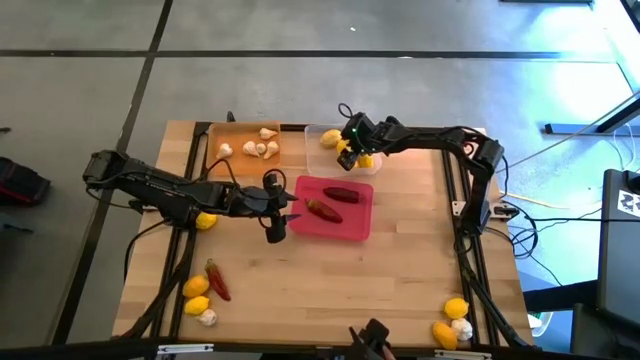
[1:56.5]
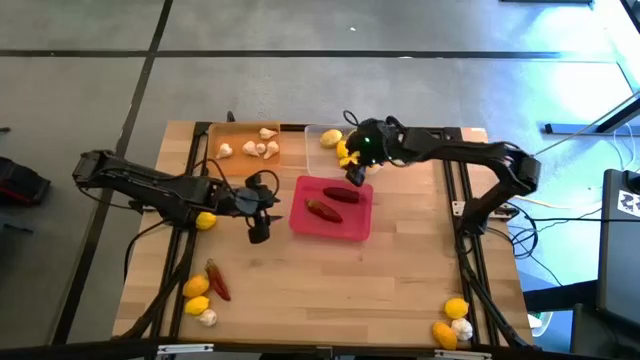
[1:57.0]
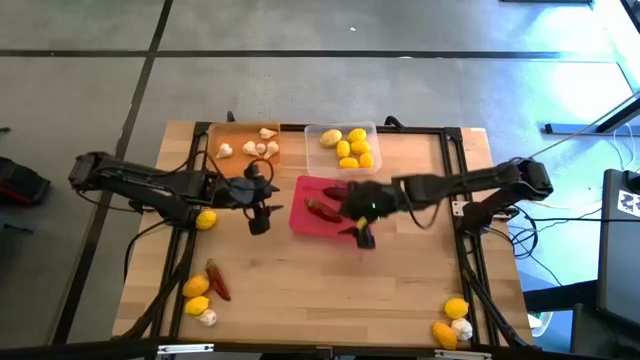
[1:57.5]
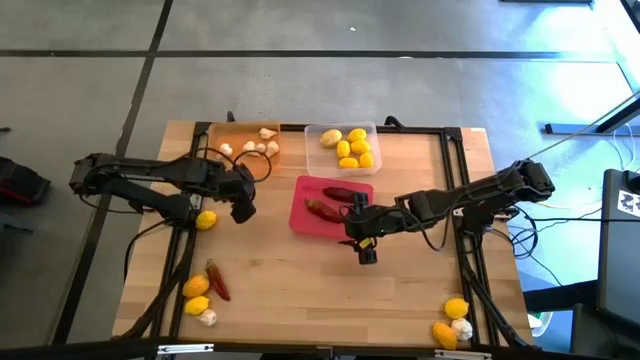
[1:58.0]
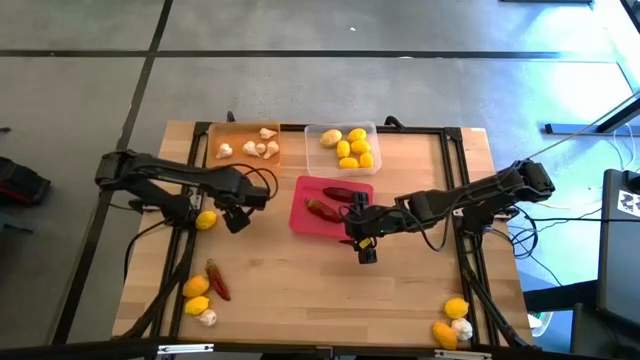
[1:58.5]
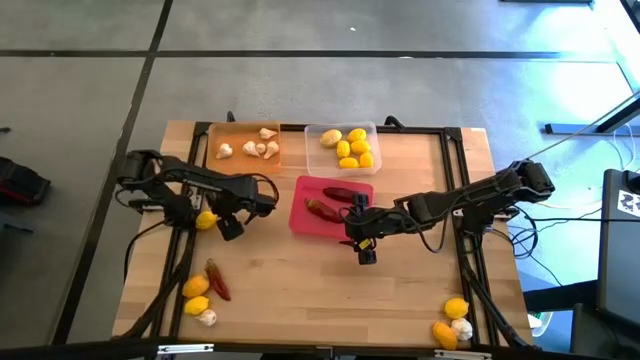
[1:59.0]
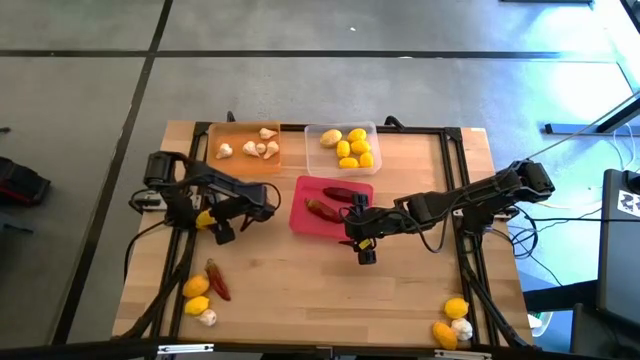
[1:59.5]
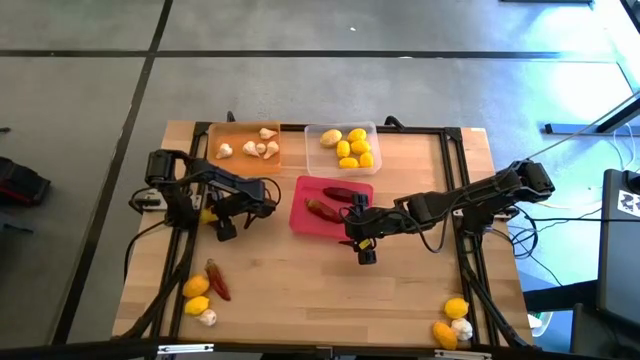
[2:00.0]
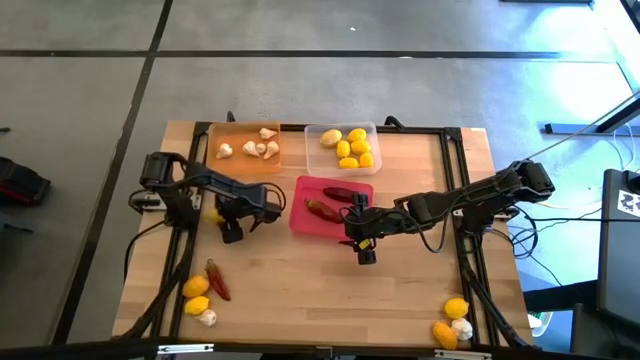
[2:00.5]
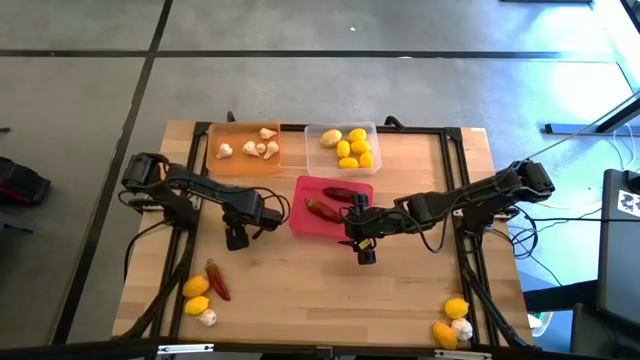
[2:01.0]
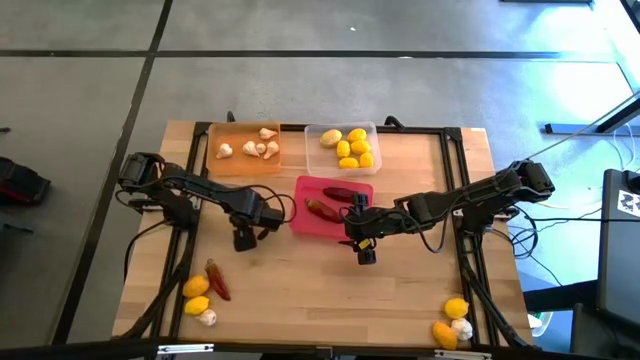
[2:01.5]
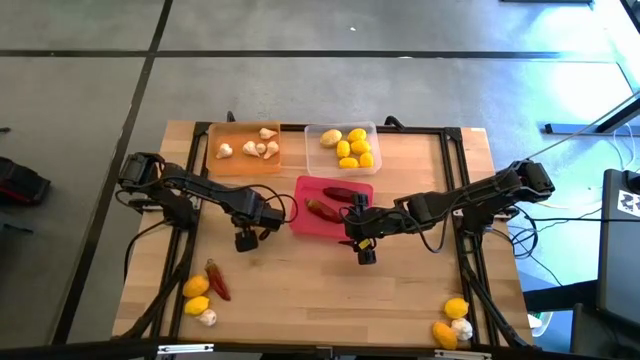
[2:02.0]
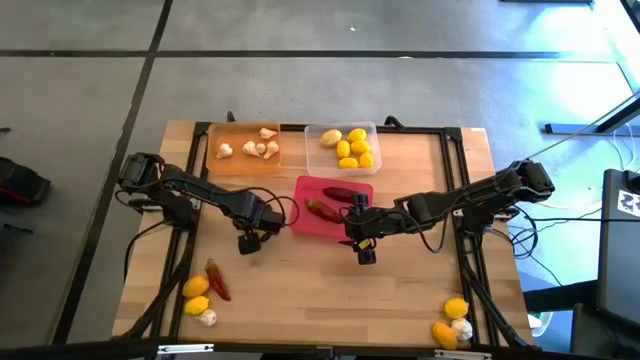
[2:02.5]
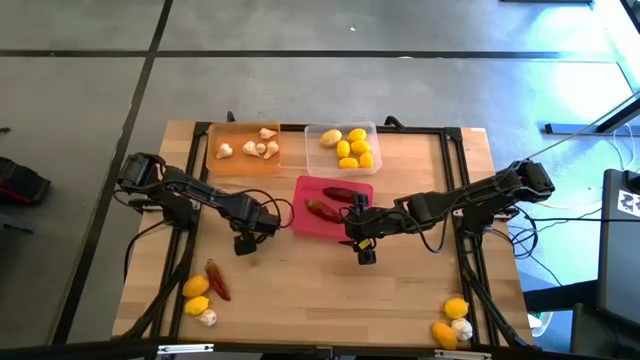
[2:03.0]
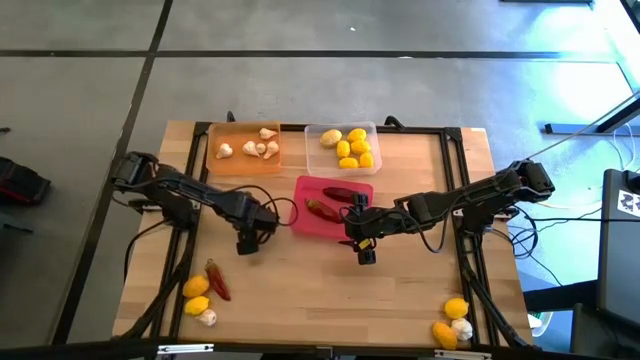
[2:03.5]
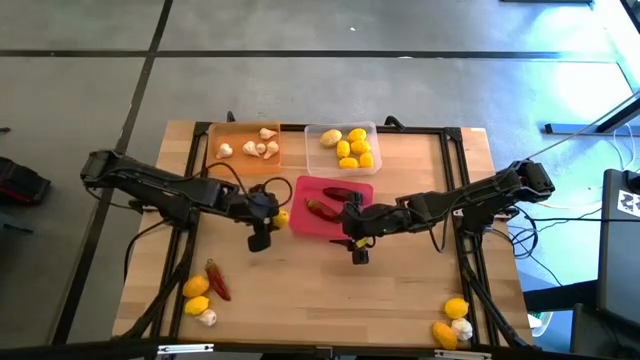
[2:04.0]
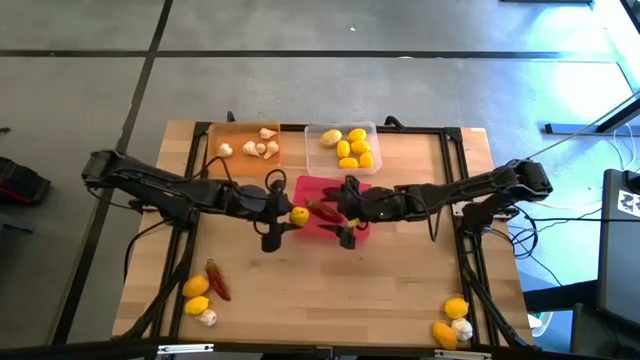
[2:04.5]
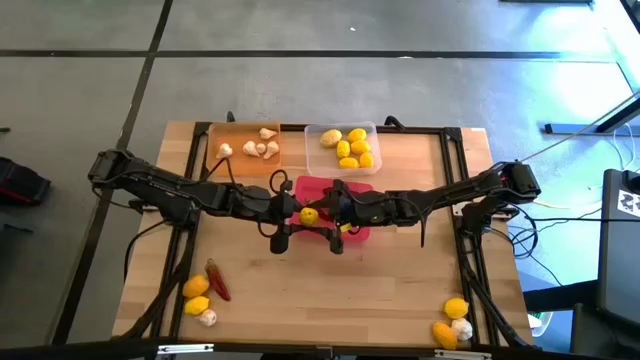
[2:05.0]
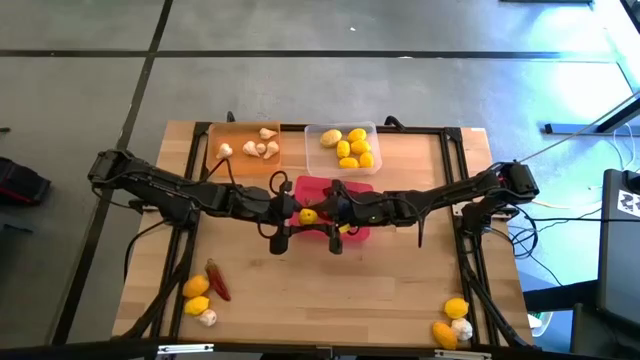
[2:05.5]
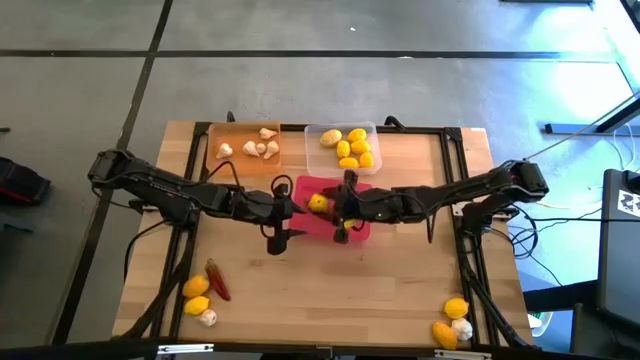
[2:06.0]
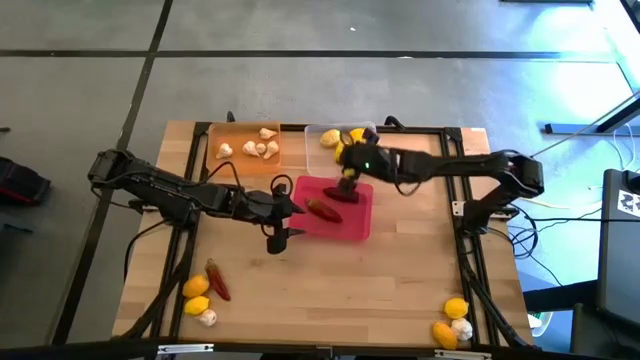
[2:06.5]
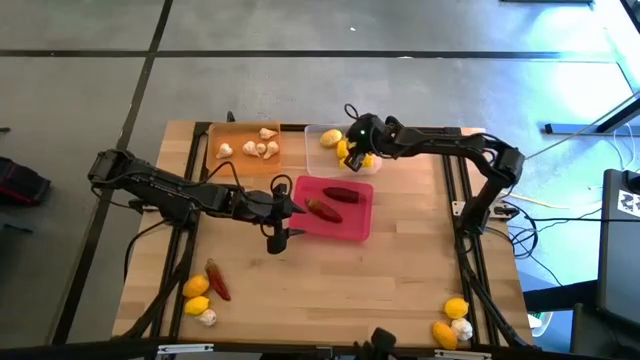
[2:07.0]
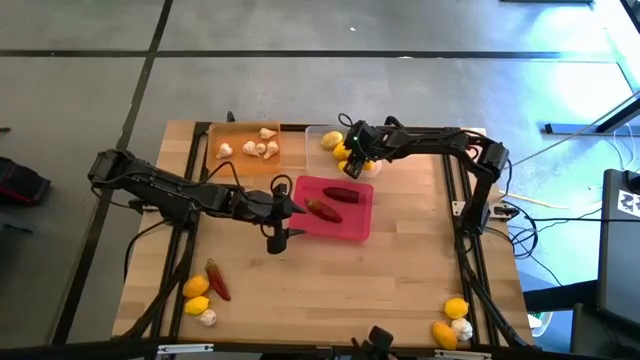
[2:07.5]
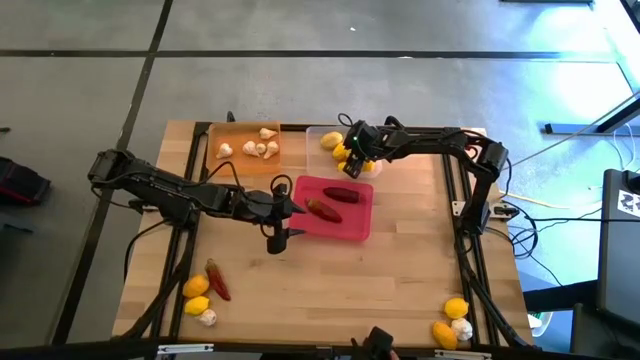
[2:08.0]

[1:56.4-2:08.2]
Task: Sort produce into baskets
Put the yellow lemon in the transparent bin

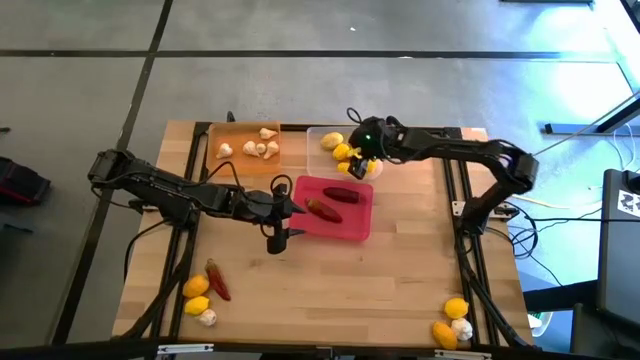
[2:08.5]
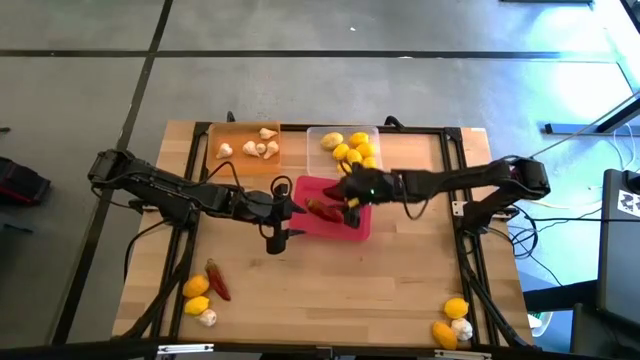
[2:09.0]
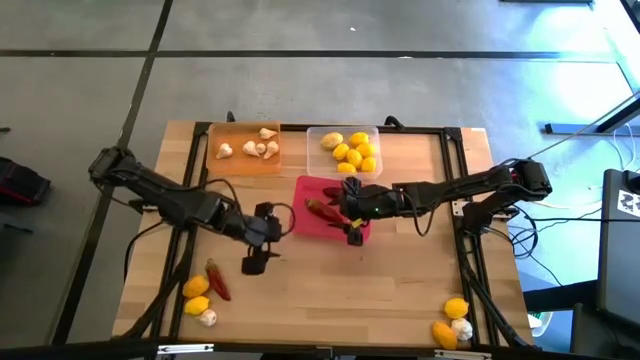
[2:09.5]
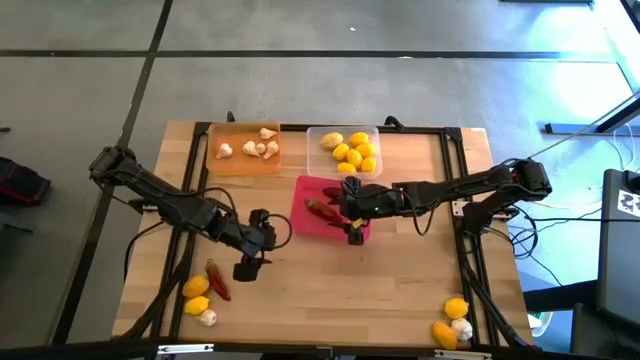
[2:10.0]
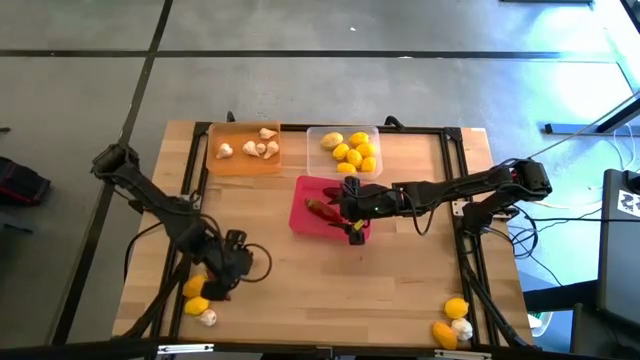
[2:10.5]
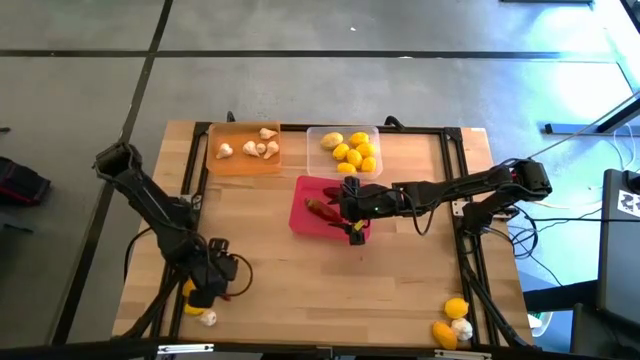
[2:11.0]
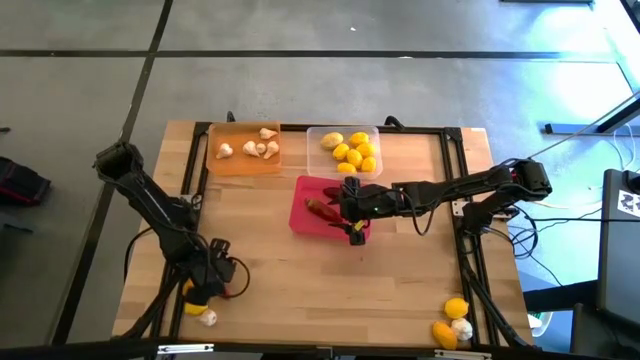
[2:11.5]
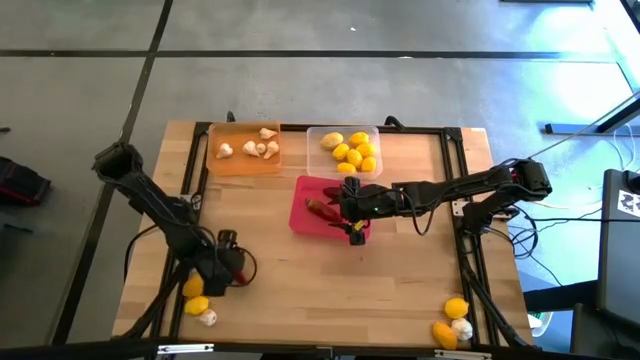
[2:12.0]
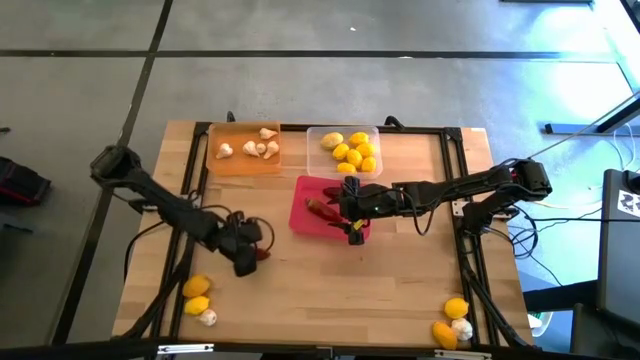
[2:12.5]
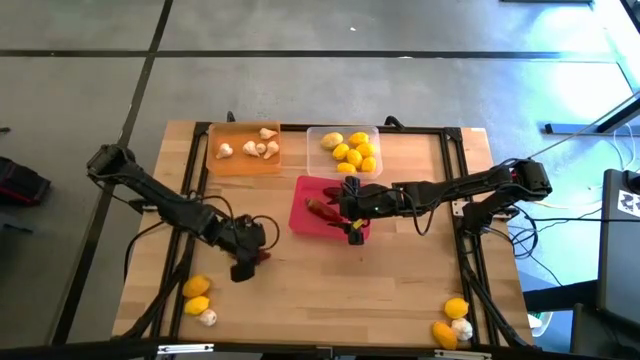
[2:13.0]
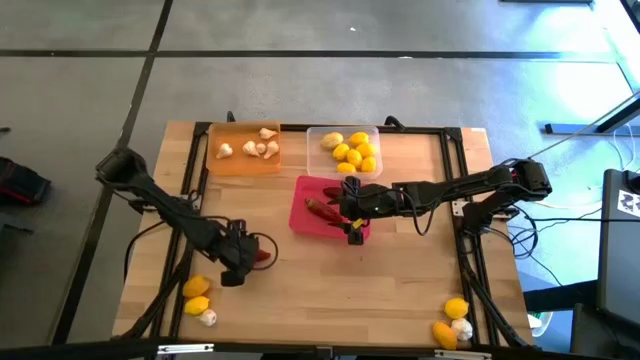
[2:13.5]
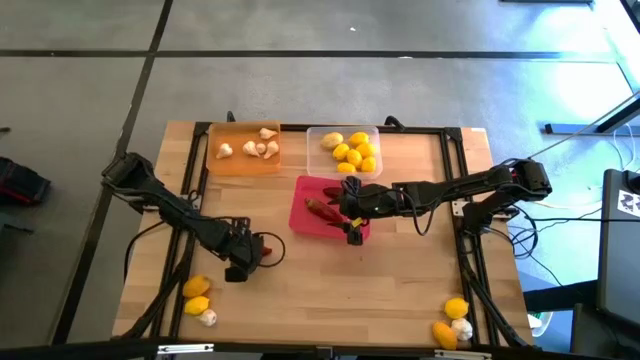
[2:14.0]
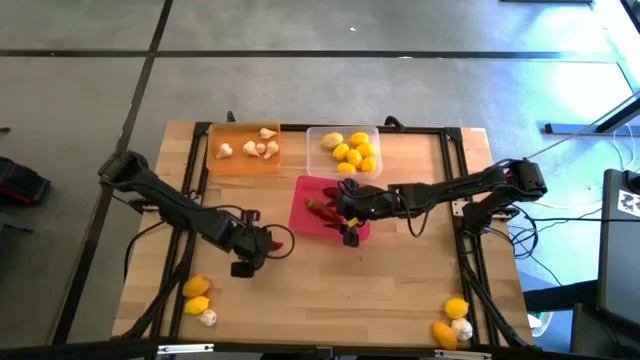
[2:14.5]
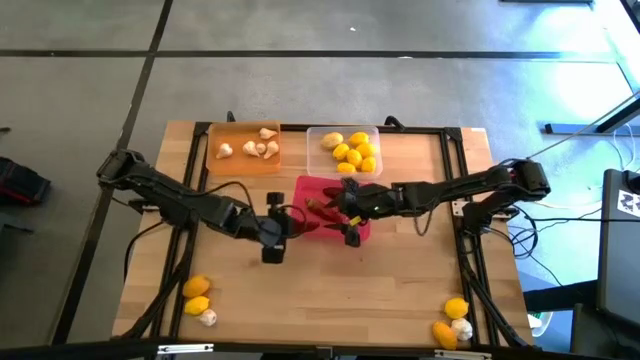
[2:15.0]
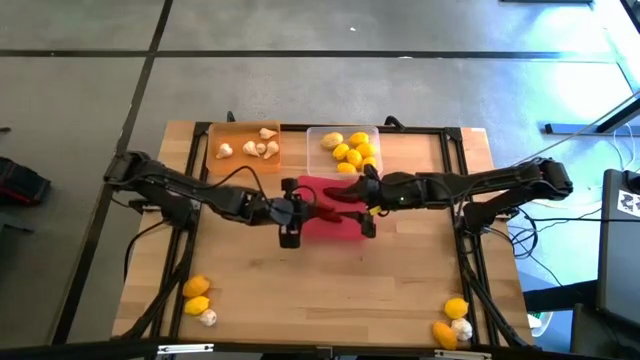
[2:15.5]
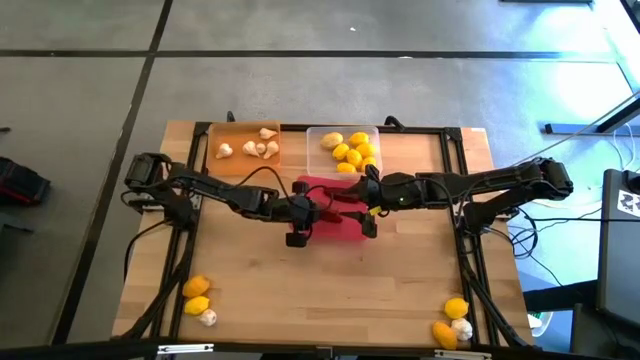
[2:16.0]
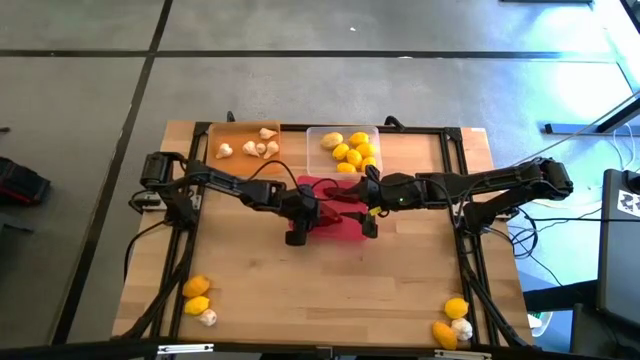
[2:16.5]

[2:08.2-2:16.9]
Put the red chili pepper in the red bin

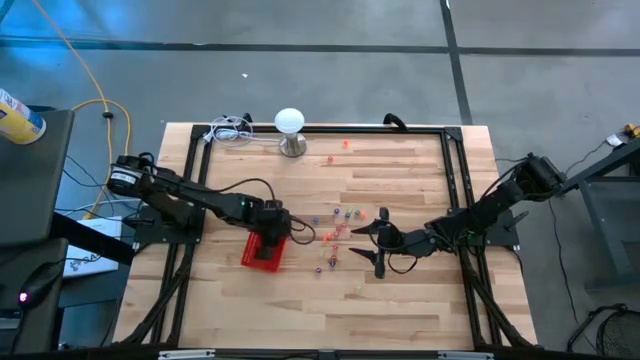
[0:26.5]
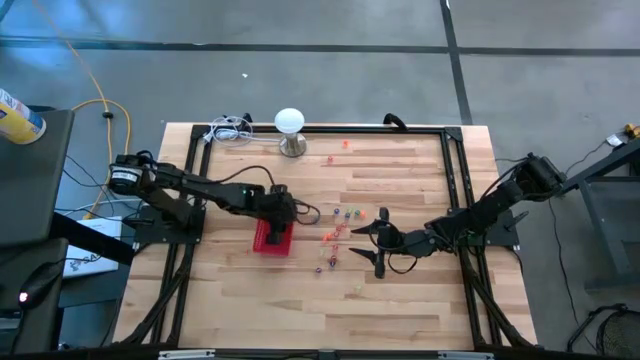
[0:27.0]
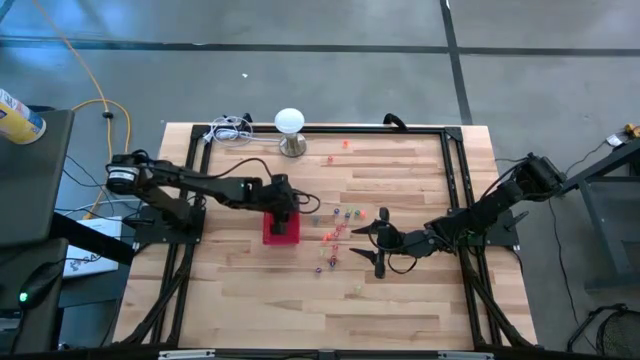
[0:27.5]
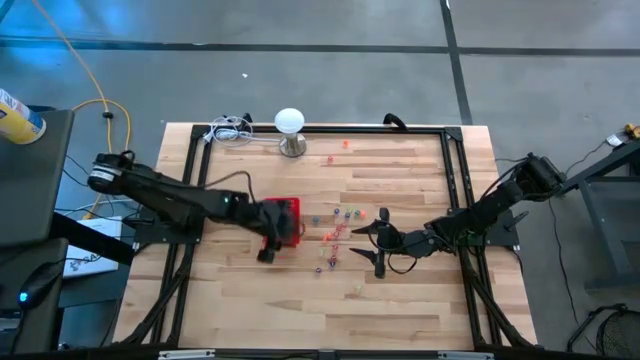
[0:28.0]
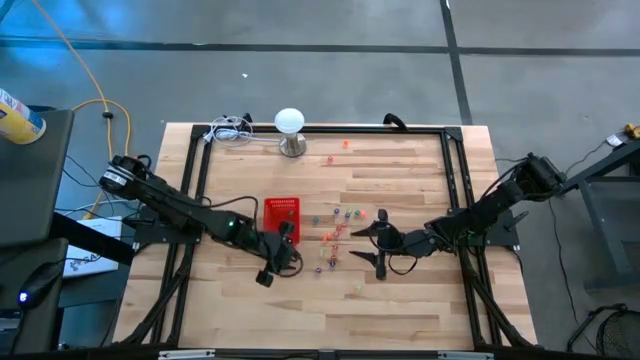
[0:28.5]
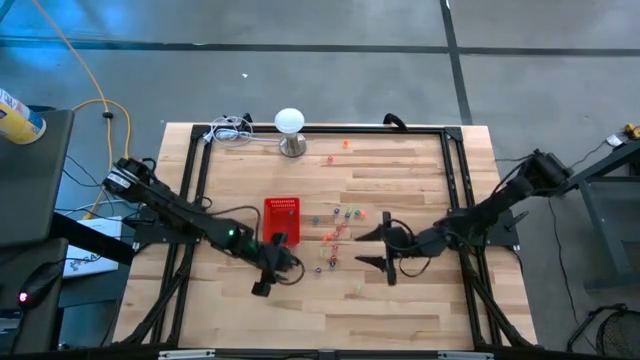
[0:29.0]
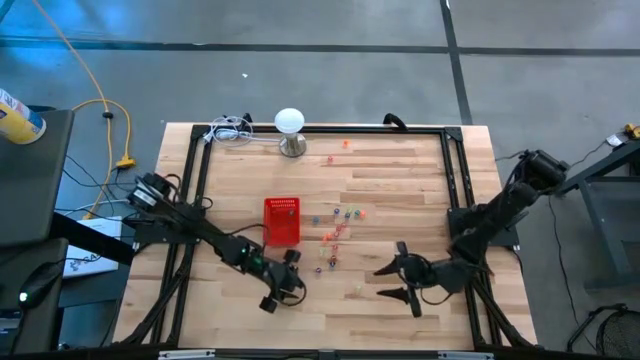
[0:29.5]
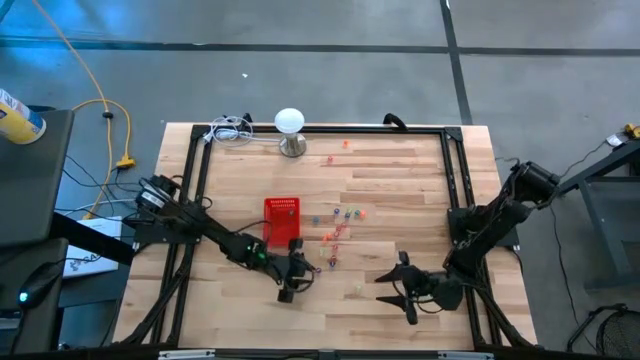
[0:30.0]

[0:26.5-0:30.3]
Task: Pick & Place Dice
Put the purple die into the red basket
